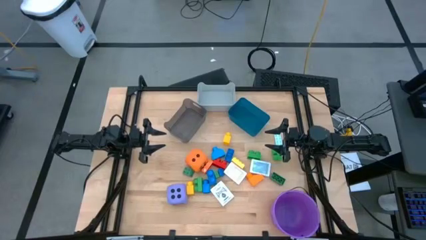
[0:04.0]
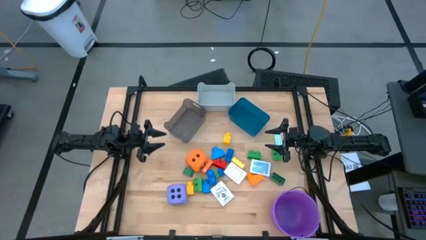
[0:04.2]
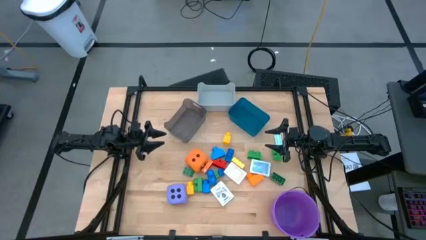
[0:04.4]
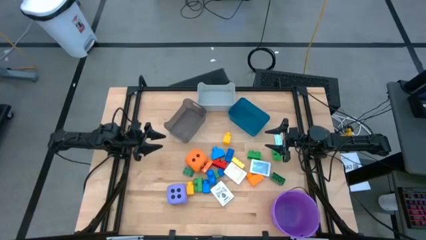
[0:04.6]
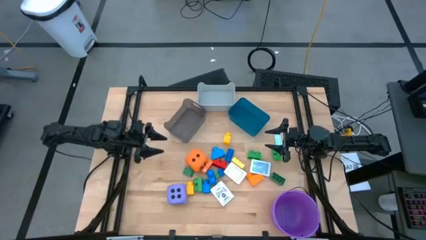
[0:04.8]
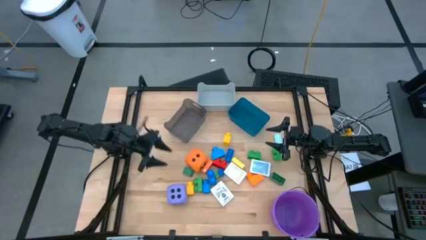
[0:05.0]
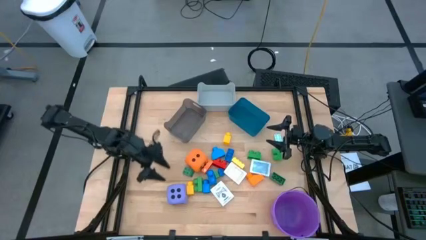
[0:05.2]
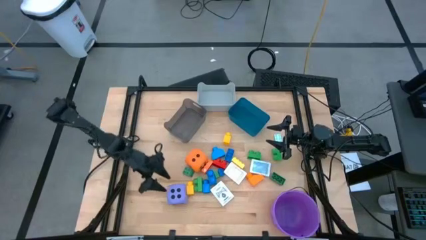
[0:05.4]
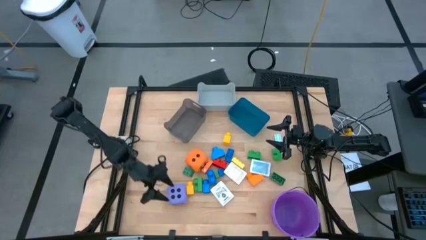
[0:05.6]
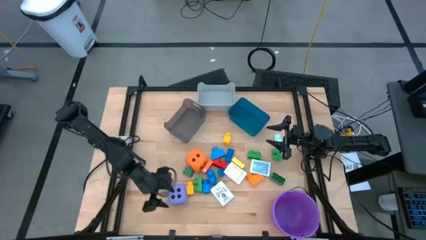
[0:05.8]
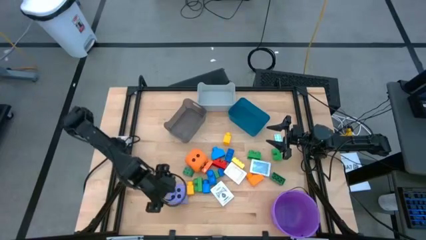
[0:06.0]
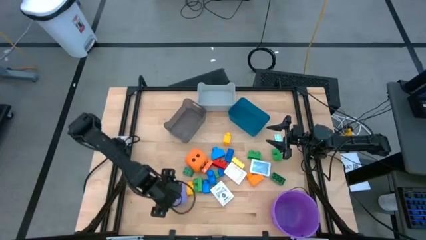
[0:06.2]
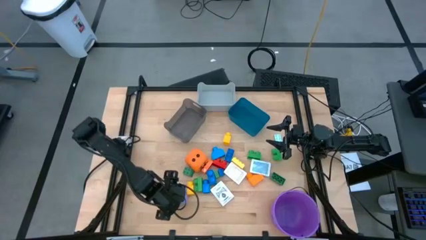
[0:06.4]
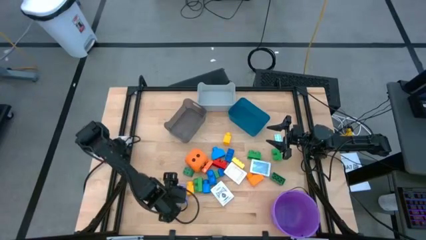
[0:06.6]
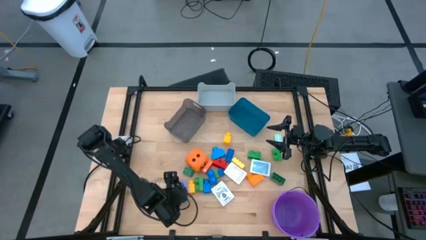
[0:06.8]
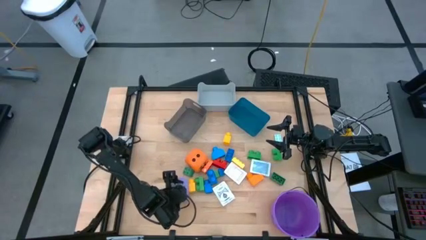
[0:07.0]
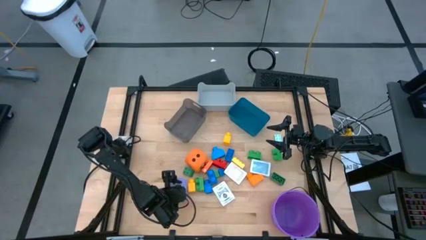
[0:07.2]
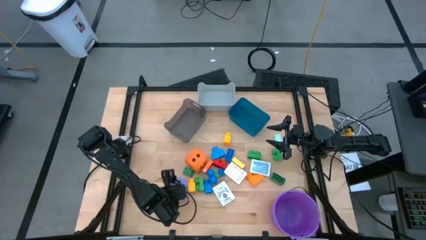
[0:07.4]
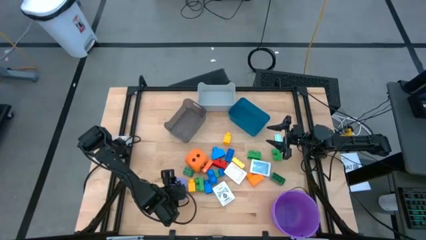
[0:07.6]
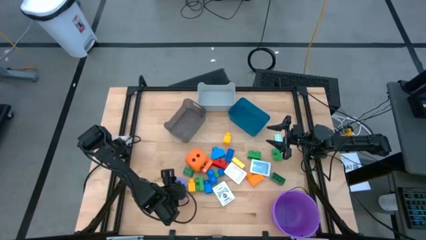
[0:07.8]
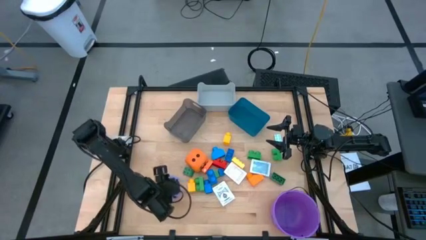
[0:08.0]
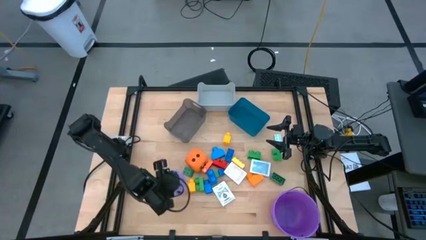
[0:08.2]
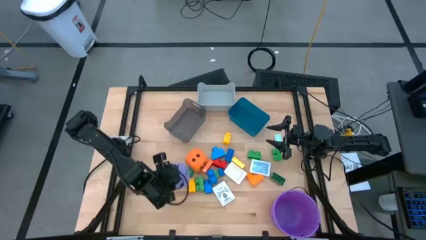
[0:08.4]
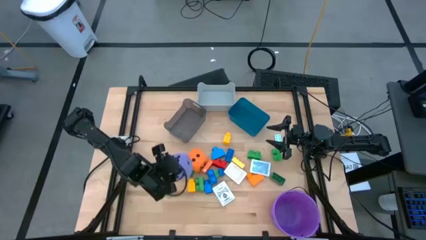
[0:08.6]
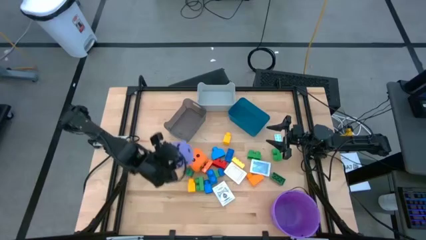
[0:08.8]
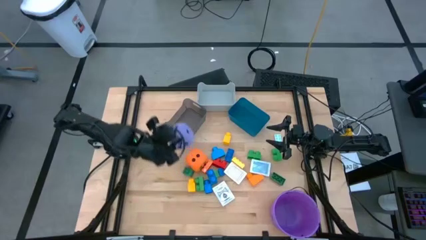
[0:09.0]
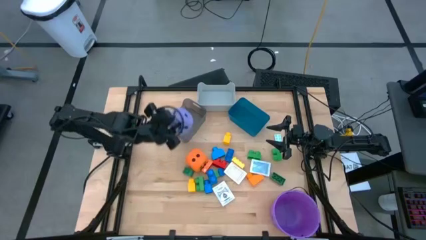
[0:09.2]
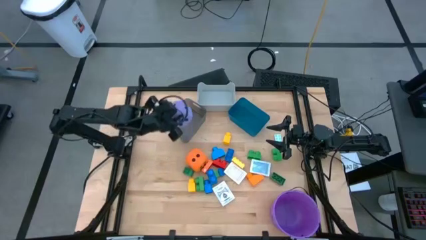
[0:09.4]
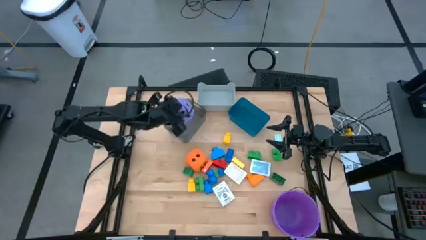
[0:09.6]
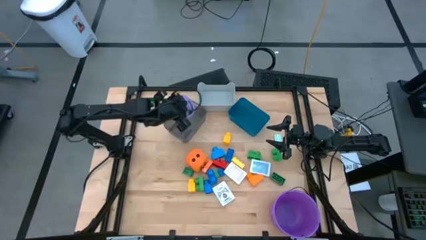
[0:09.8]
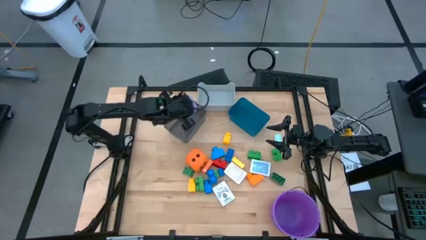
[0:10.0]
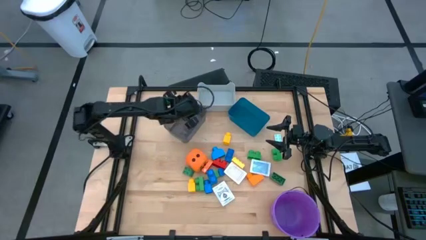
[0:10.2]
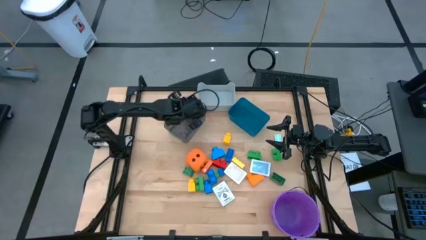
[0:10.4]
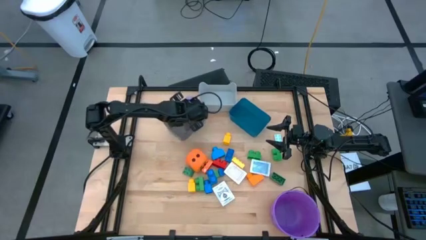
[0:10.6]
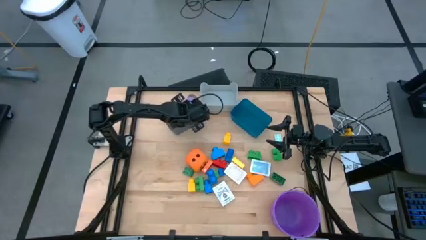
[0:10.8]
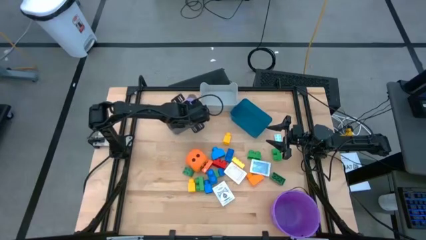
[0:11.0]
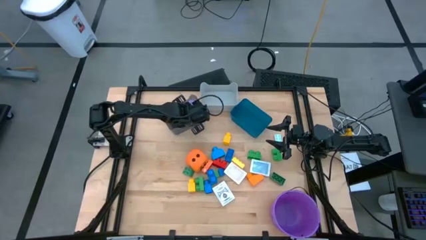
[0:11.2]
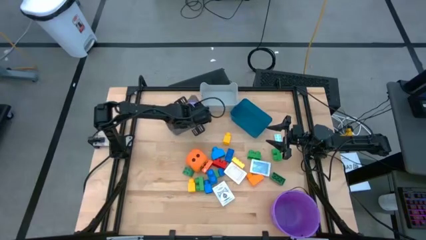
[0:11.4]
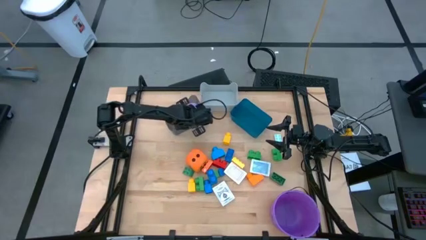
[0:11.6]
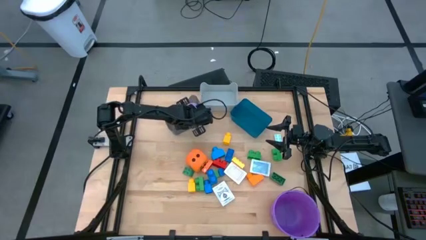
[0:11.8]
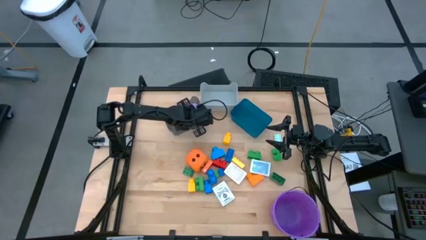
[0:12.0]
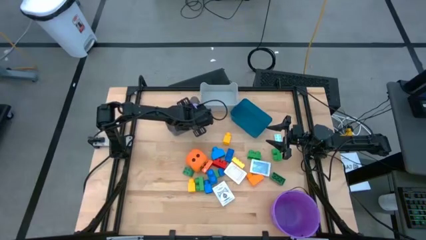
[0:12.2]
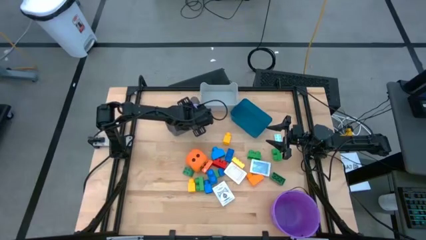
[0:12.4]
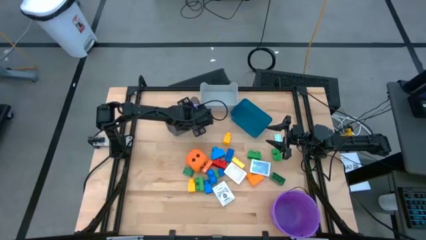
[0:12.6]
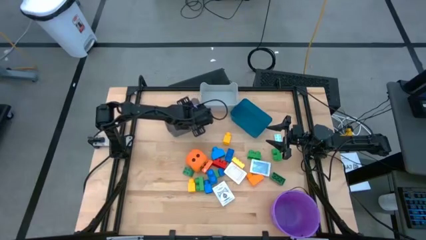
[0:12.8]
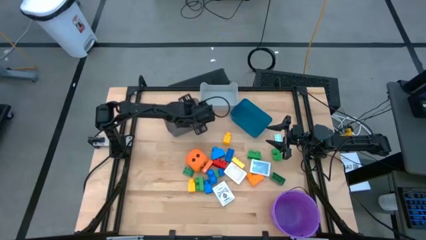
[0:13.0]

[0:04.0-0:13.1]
Task: Pick & Place Toys
Put the purple dice into the black bin

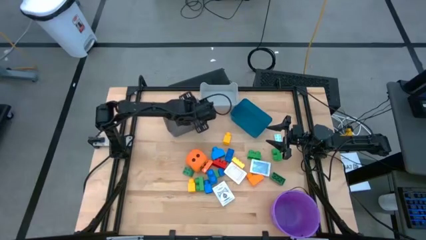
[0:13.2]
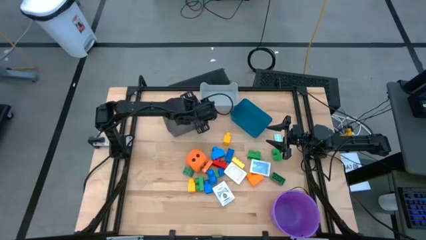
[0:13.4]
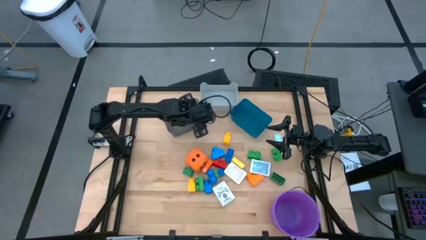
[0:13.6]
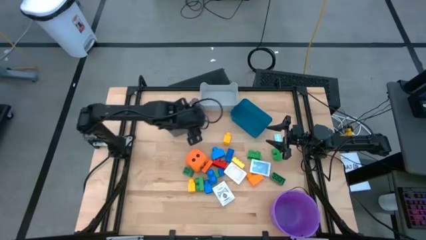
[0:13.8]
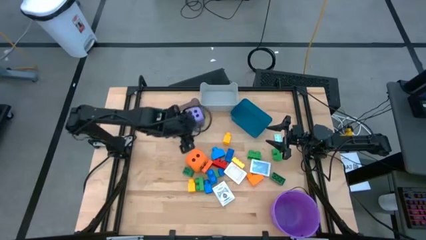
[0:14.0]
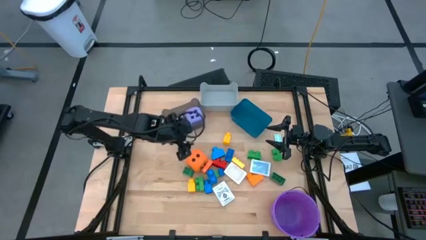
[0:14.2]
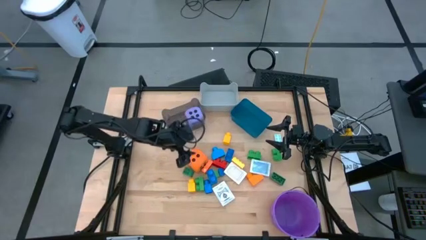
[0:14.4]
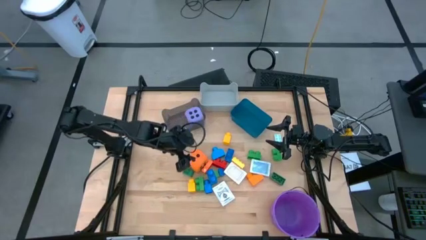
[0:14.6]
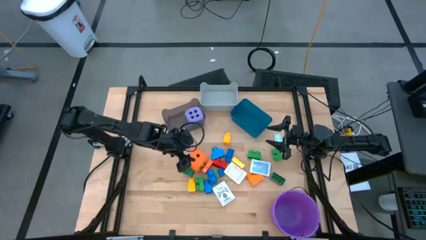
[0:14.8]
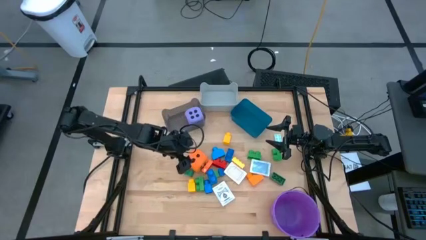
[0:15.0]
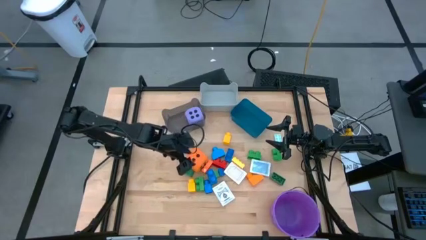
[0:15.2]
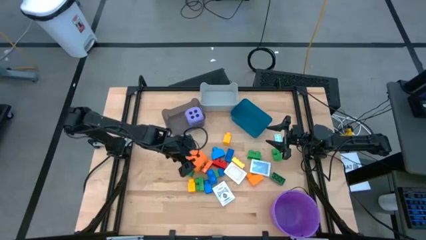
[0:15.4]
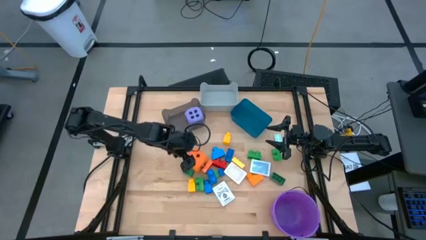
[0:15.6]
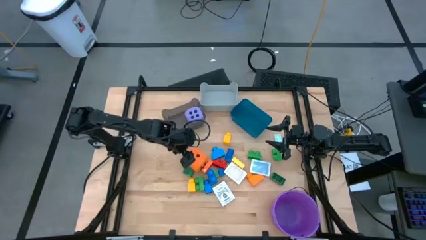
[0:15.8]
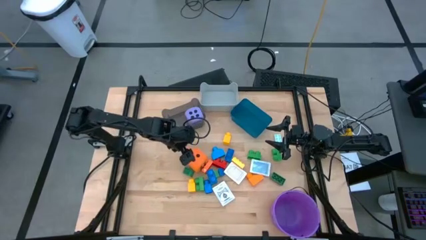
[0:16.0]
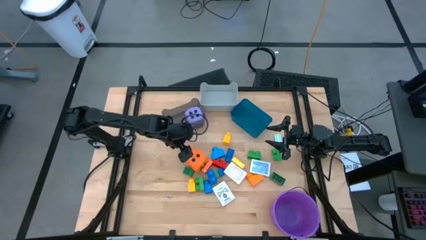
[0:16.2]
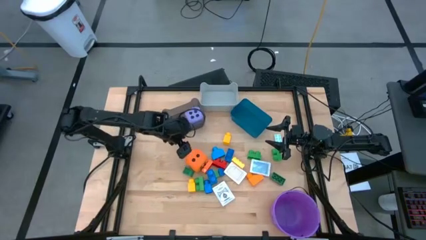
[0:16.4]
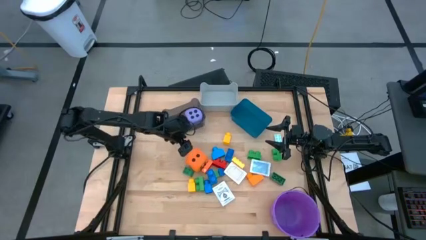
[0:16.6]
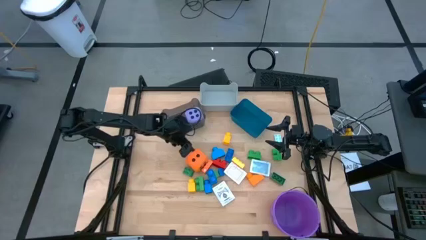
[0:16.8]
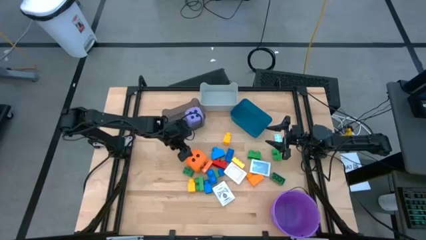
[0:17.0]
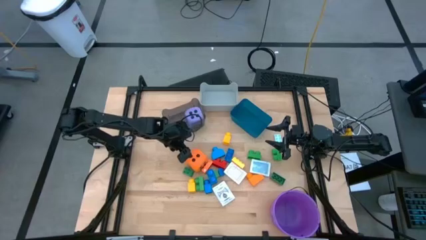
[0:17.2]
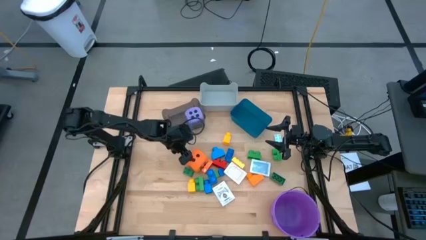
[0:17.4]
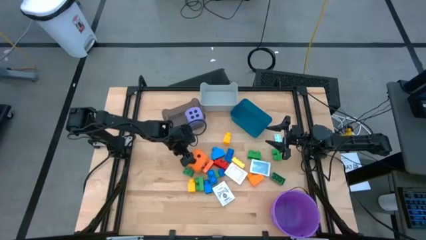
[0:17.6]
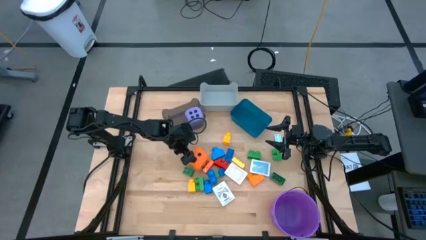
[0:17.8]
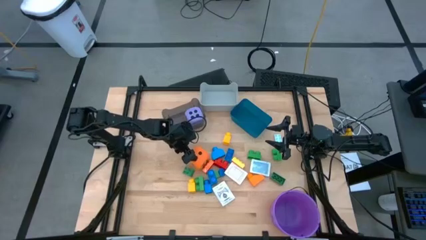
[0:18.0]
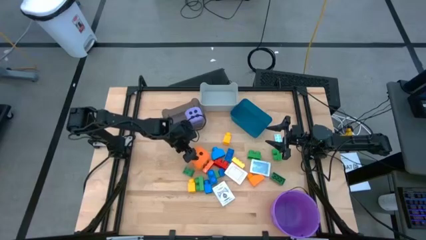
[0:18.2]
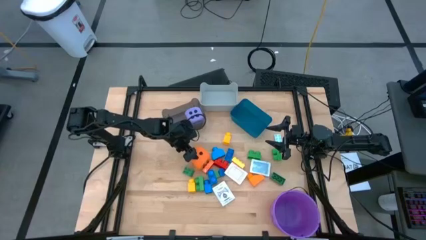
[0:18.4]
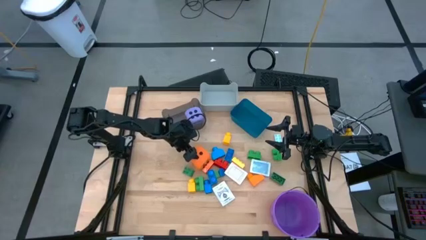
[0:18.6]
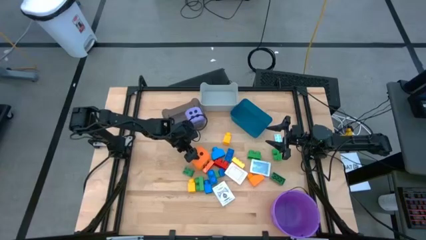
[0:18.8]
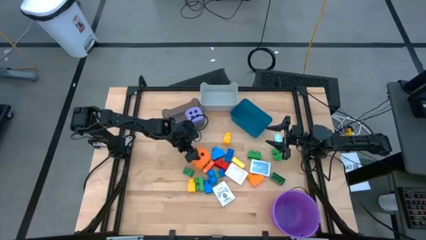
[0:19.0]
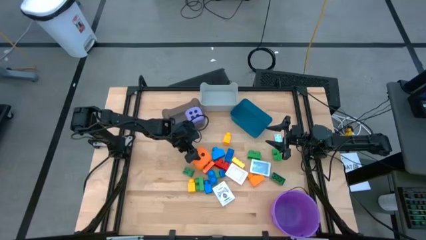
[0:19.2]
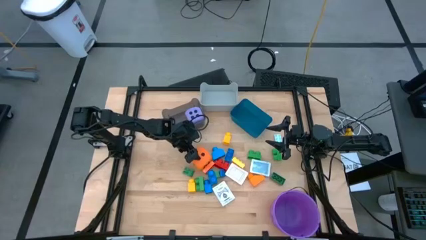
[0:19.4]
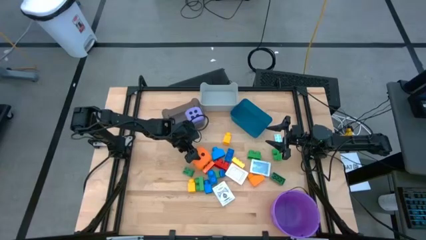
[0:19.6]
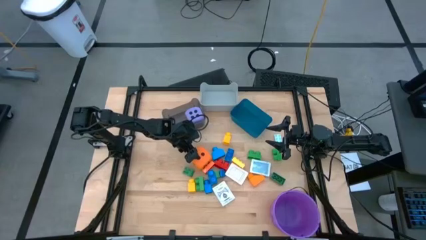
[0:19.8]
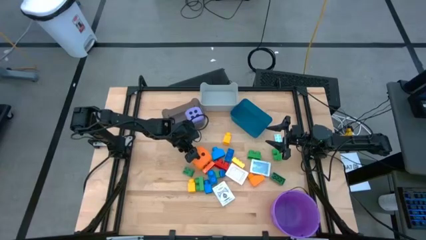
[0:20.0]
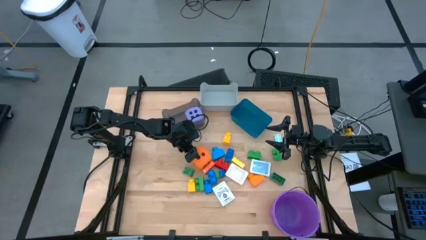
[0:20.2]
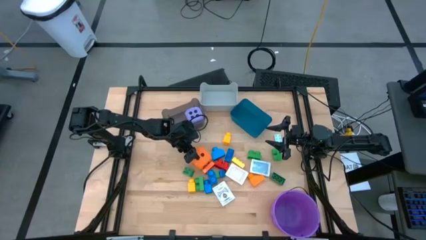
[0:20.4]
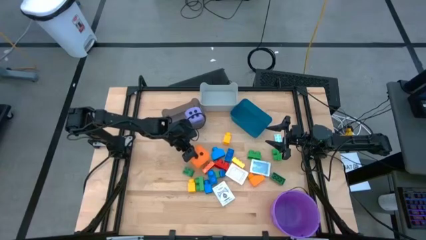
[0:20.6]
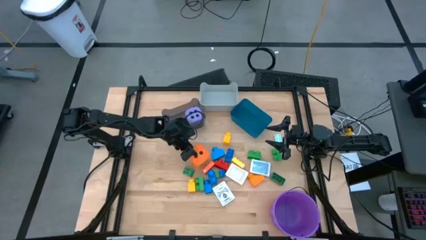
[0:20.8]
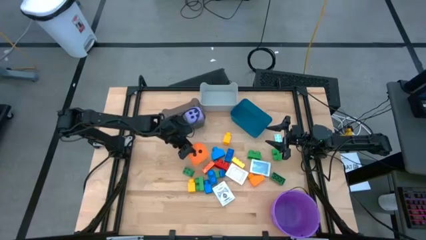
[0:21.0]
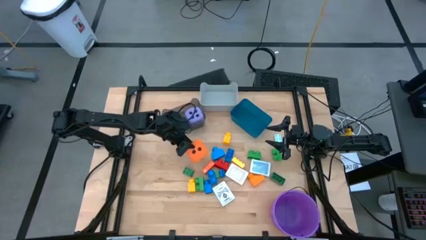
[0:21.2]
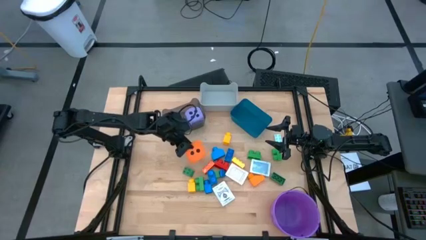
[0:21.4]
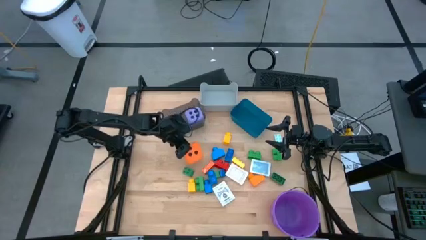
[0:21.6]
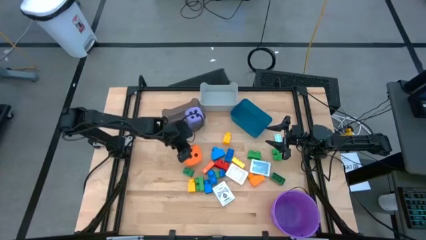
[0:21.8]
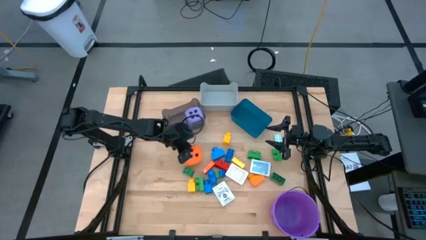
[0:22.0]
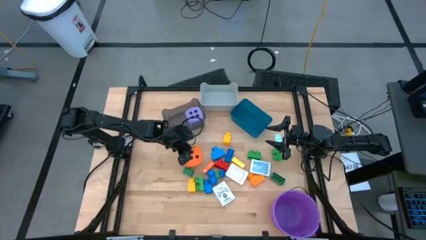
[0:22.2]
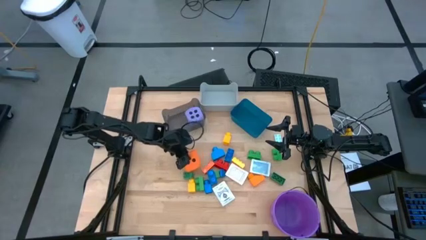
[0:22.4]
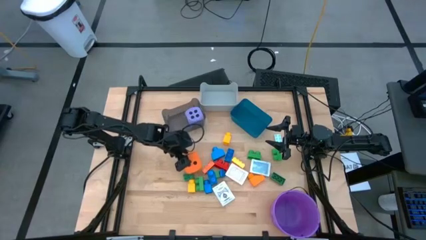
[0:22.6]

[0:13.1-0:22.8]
Put the orange dice into the transparent black bin
